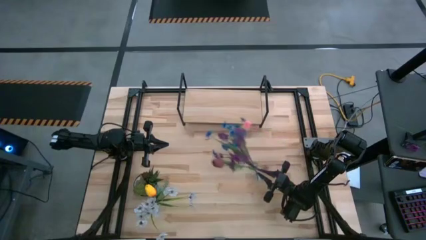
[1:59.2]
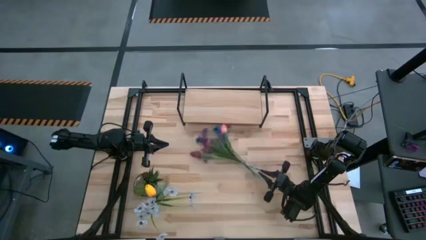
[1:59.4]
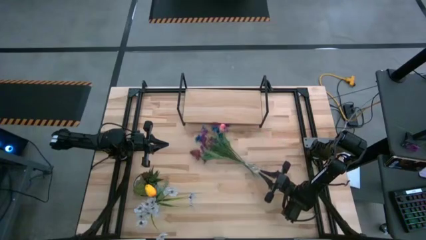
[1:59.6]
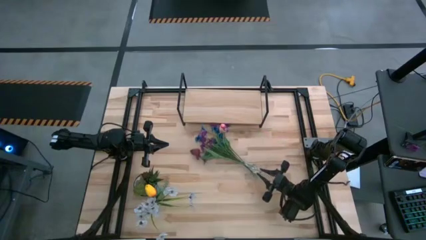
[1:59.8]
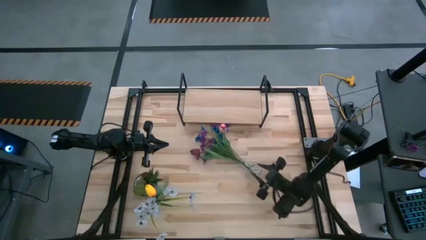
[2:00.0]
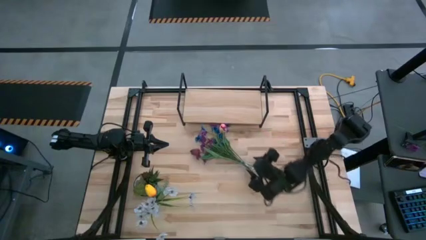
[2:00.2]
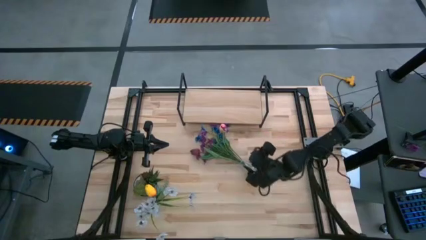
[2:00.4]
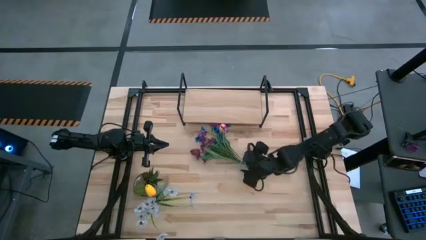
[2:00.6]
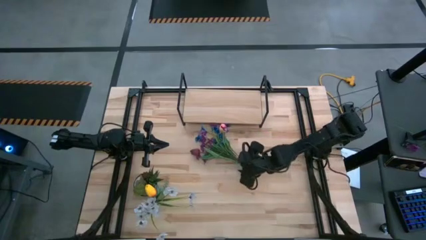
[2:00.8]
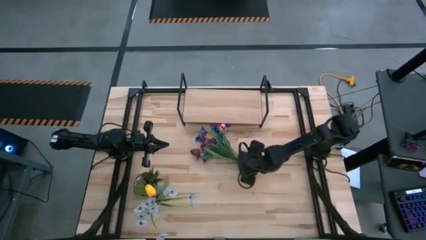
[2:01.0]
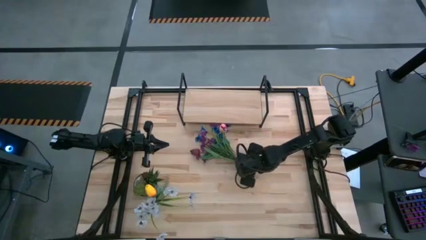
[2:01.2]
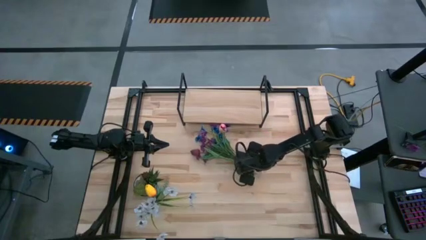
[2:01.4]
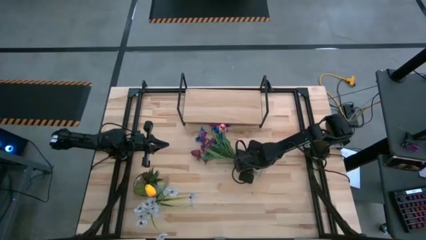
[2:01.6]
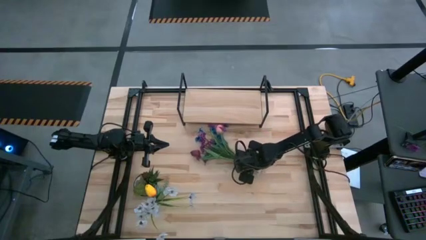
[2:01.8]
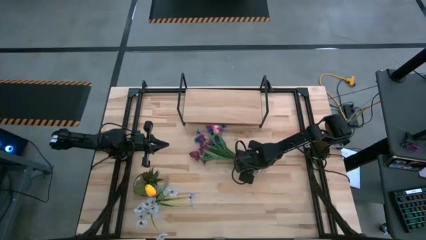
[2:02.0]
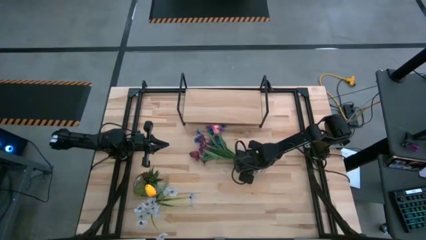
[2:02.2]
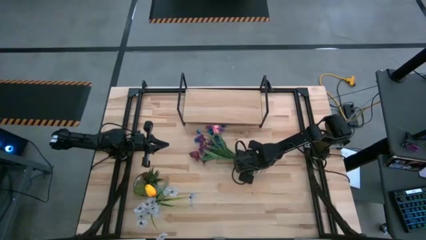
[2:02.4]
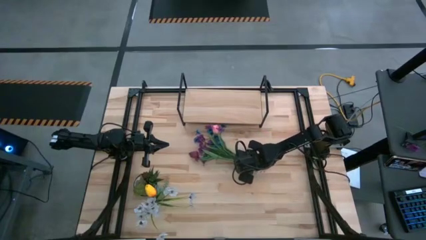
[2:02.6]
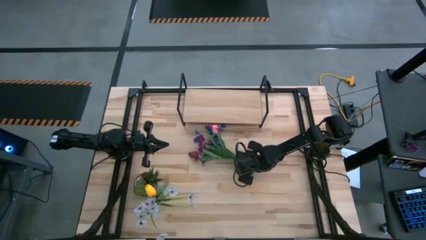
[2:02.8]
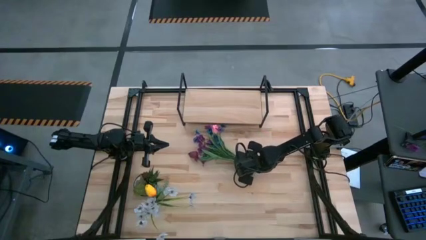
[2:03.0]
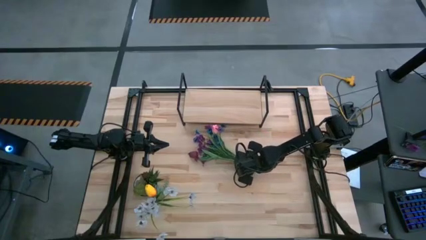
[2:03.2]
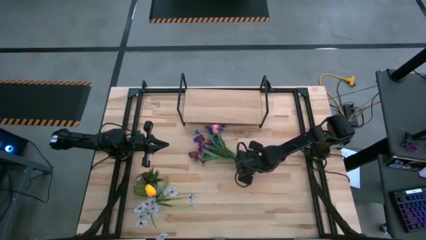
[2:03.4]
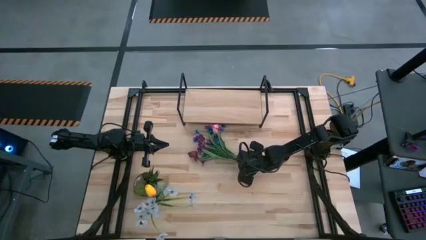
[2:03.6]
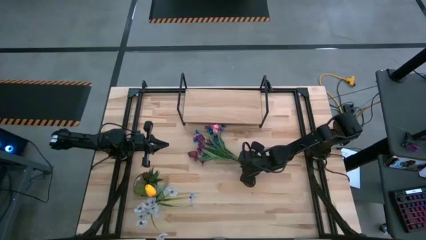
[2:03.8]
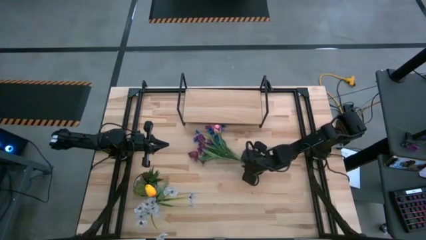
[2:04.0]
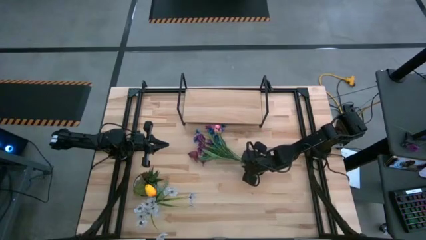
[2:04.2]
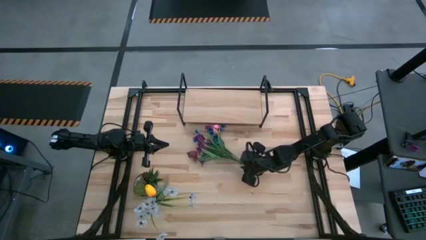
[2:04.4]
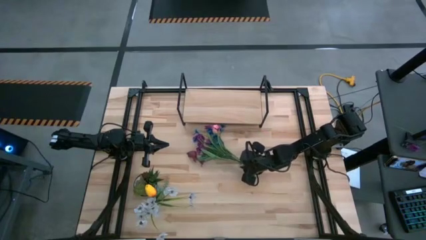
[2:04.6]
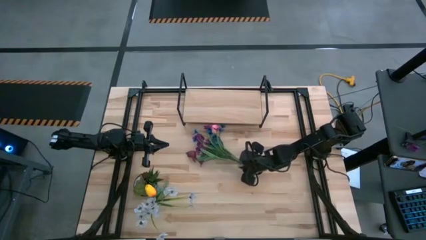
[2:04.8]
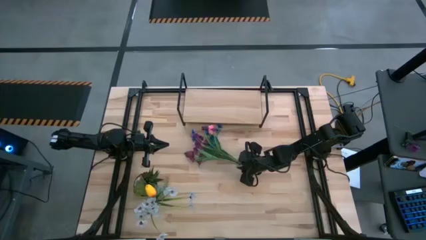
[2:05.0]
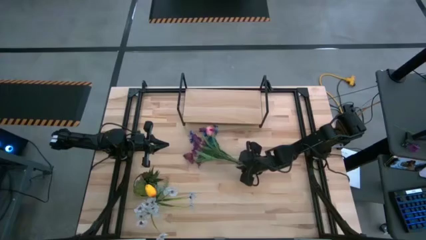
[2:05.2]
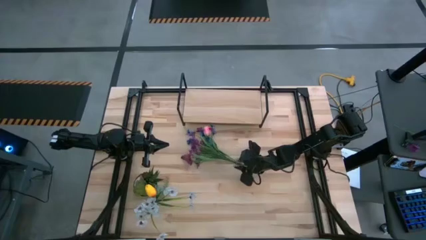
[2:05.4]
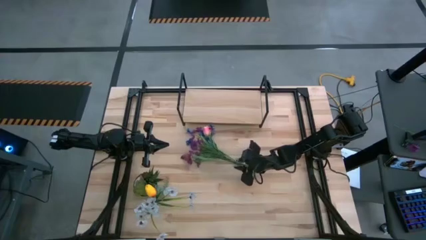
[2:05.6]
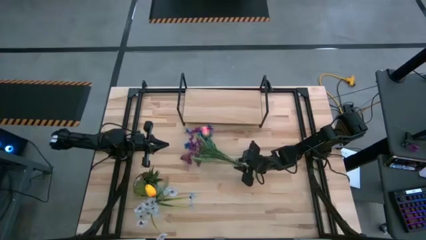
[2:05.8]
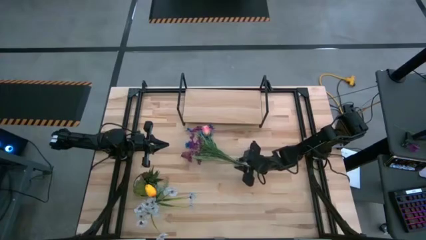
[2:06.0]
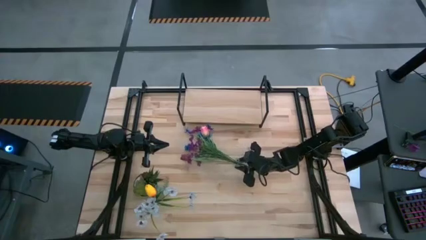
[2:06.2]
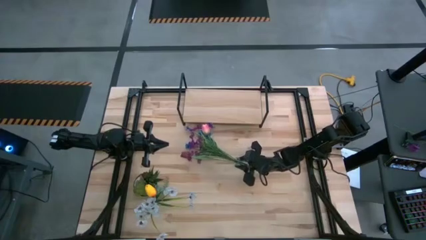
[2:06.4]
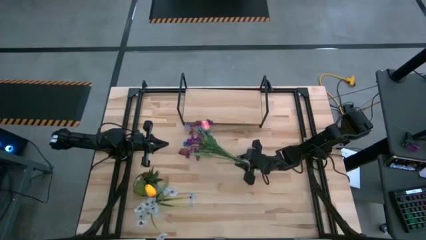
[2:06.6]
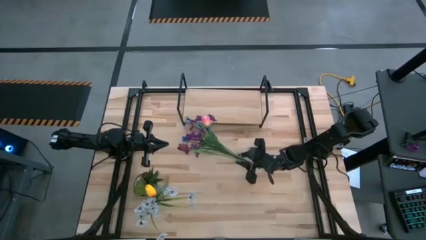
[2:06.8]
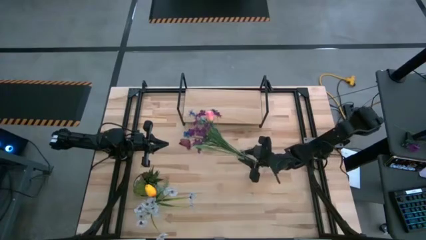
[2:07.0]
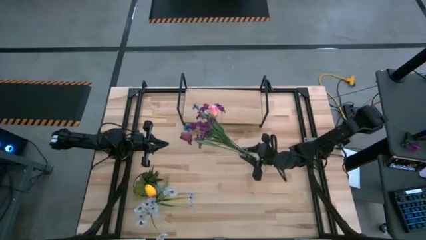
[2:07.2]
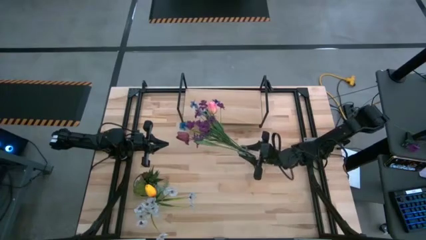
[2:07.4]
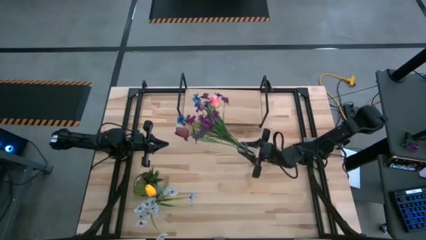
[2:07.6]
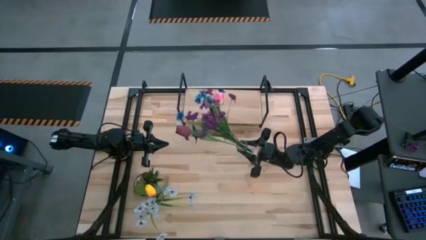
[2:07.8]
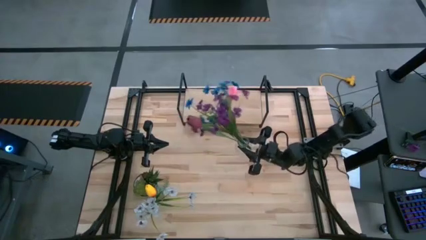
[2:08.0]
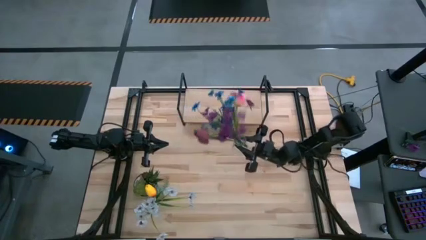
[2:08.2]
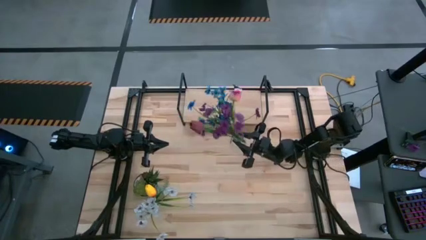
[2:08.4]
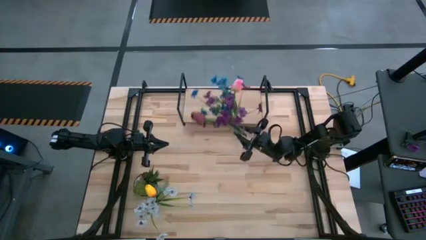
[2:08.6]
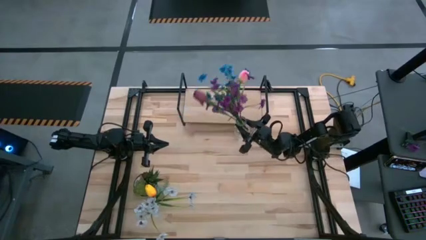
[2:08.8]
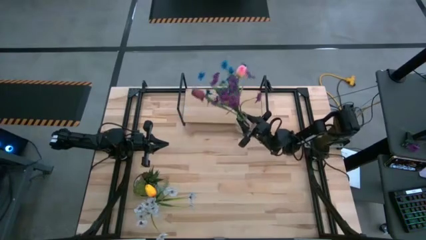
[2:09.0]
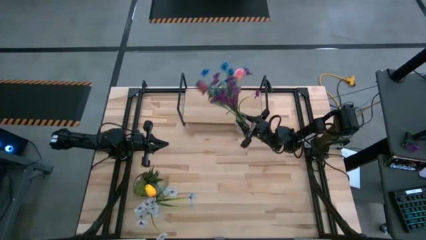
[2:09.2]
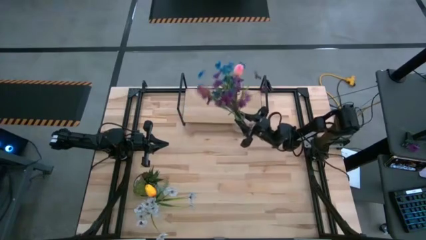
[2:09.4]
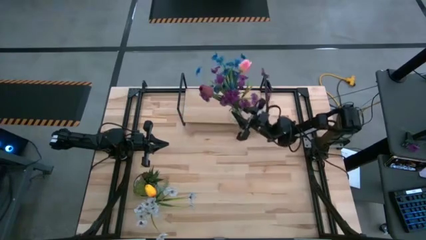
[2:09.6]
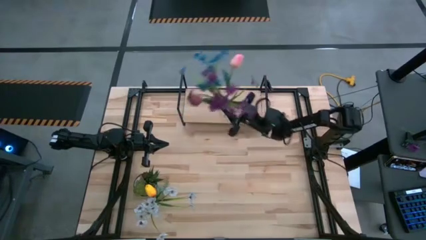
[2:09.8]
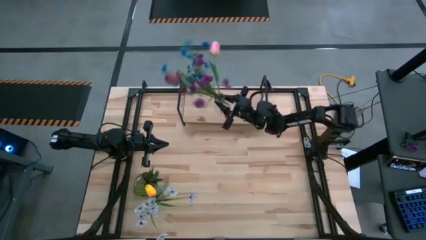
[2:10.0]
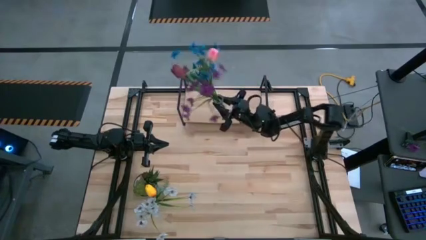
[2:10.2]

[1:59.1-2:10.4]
Task: Pick and place flowers into a vace then onto a shelf
Put the right transparent vase on the shelf

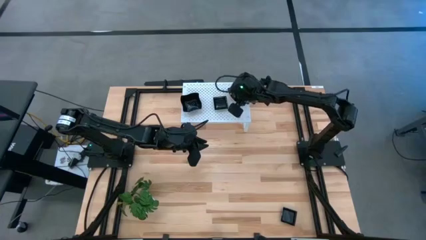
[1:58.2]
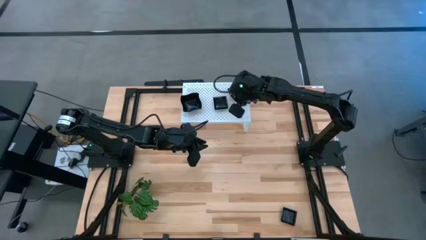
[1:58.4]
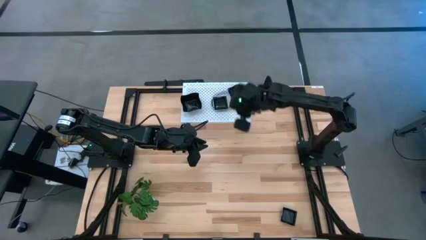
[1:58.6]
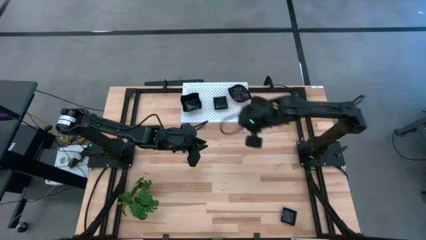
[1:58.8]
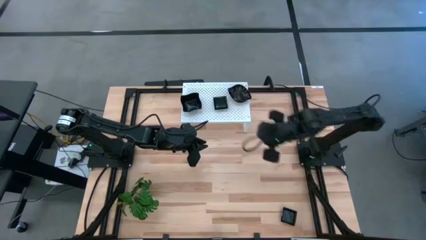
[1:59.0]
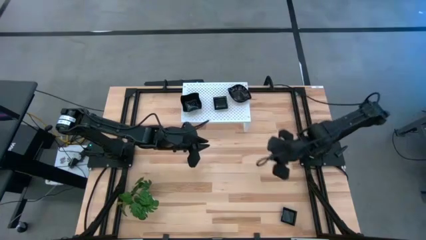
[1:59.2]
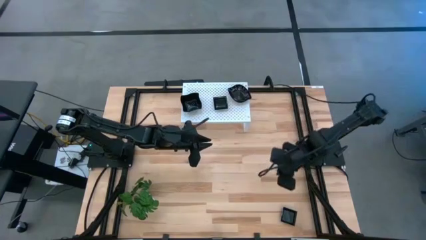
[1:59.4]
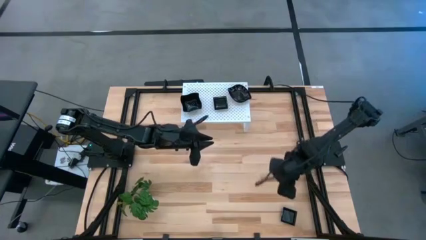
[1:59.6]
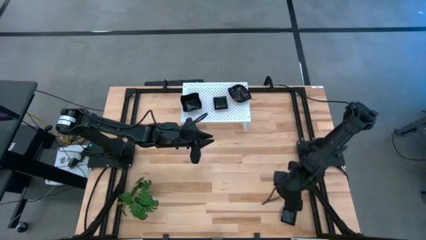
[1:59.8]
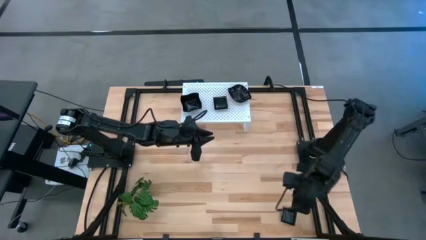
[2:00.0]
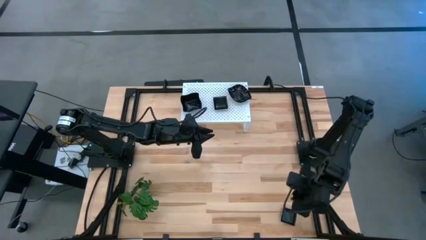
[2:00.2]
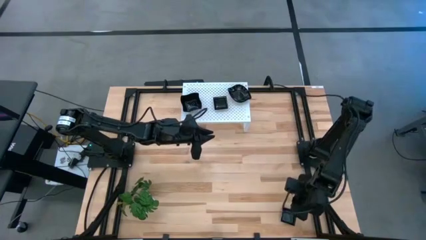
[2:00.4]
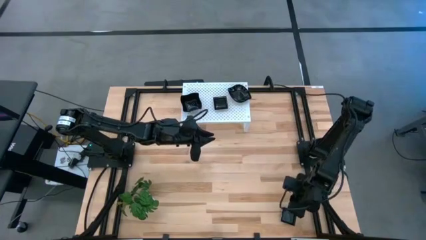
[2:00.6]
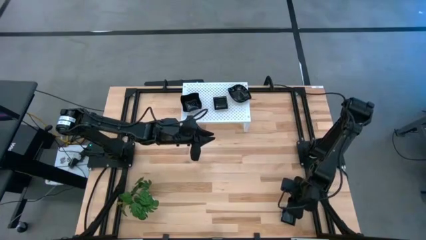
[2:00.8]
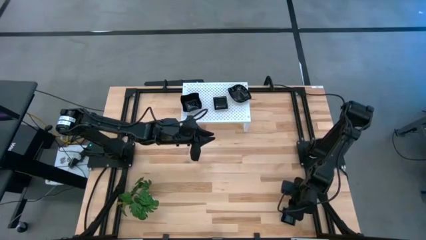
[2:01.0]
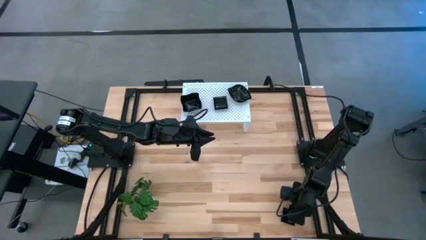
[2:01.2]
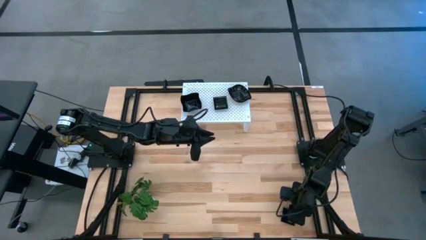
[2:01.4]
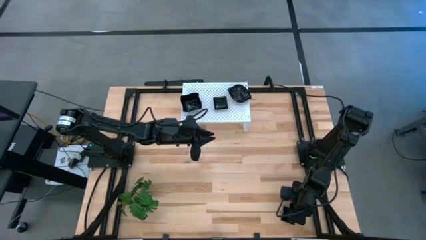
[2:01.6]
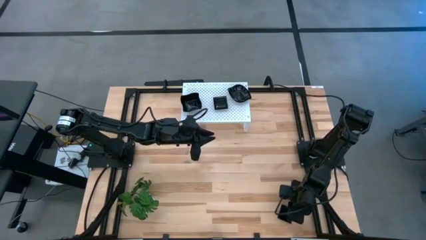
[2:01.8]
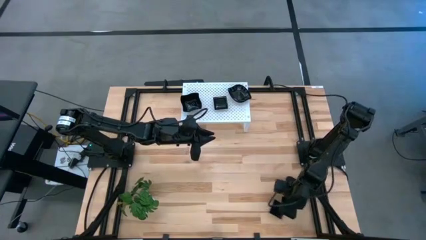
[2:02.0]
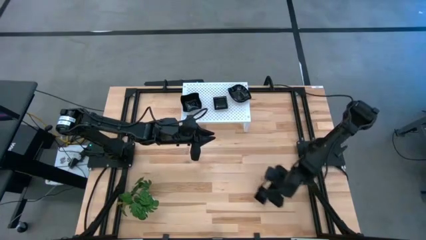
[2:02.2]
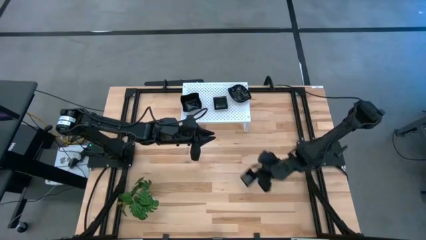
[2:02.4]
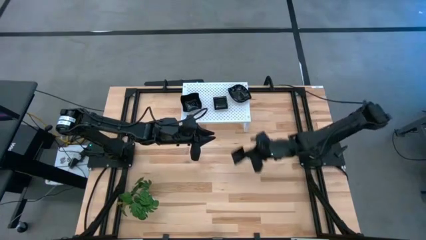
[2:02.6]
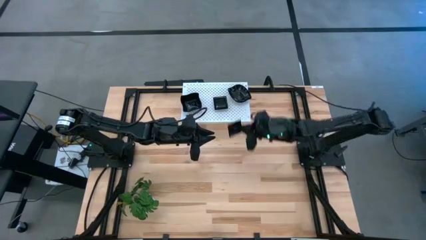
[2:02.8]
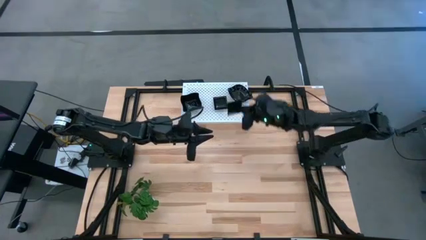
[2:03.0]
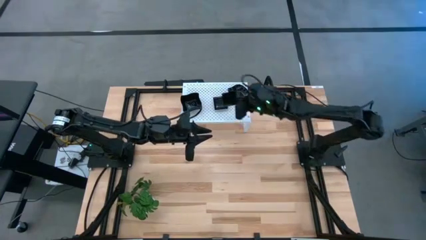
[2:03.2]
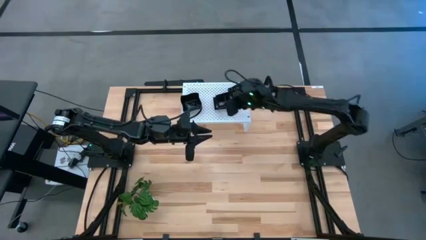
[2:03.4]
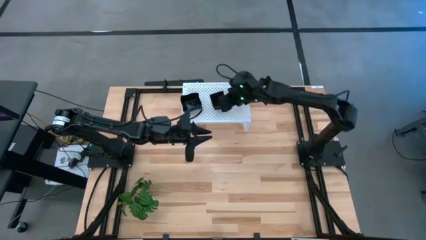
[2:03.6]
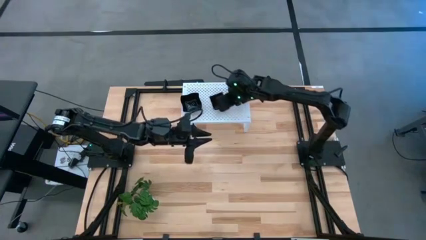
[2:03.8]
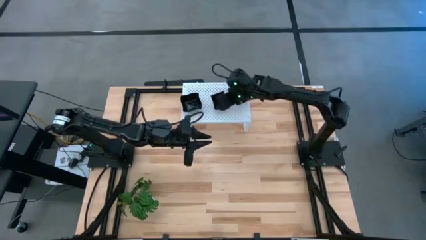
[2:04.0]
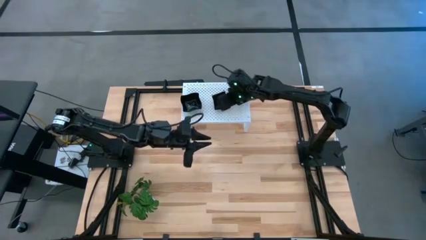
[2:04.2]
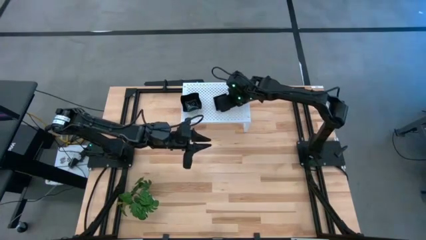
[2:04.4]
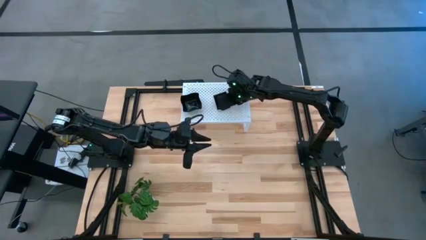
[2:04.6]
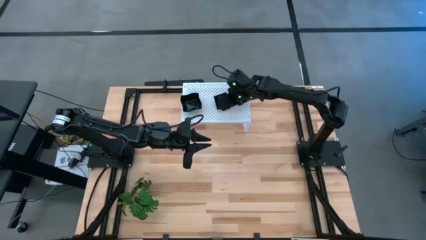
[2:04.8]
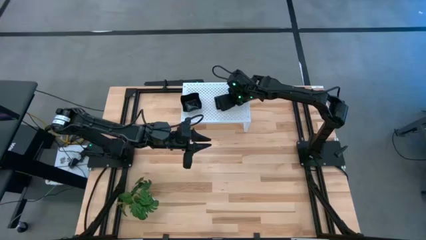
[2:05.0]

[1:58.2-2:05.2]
Task: Pick & Place Mini shaped plates
Stack the square plate on top of the other square plates on the shelf
